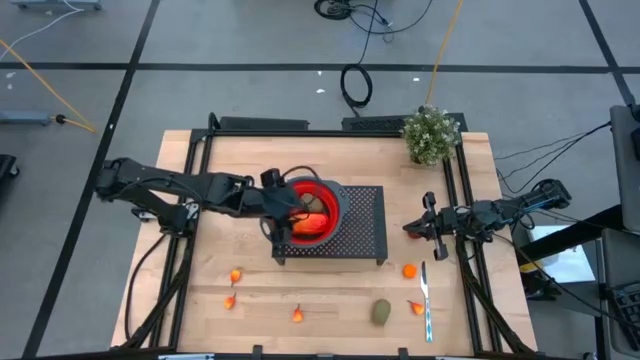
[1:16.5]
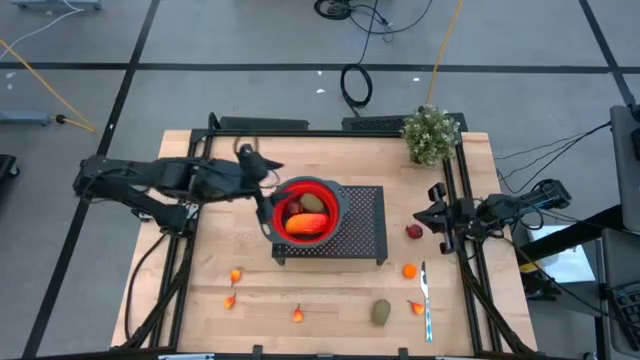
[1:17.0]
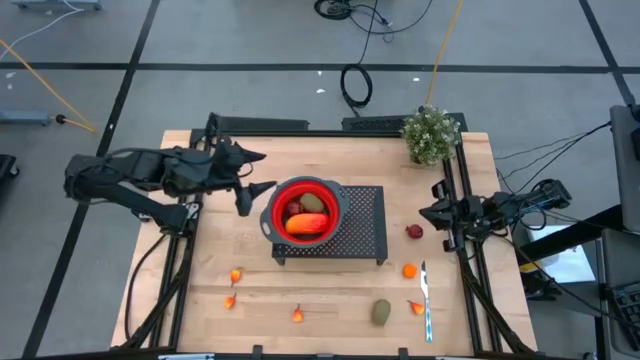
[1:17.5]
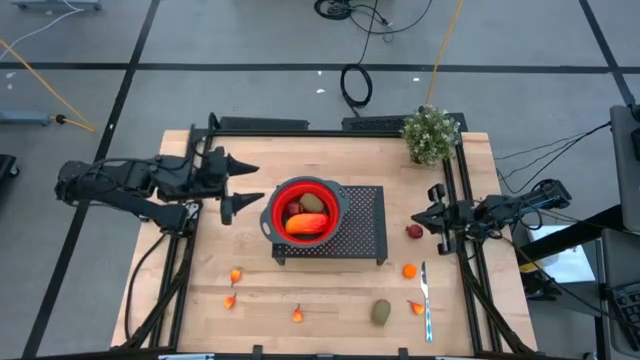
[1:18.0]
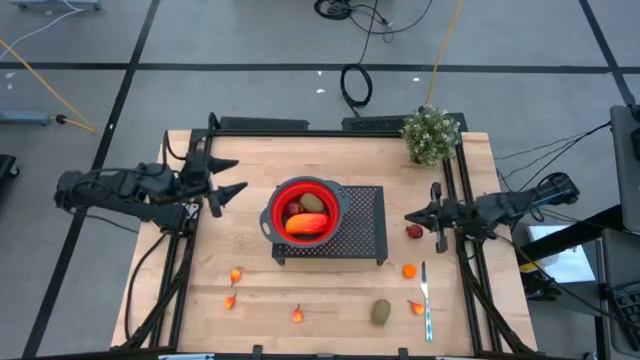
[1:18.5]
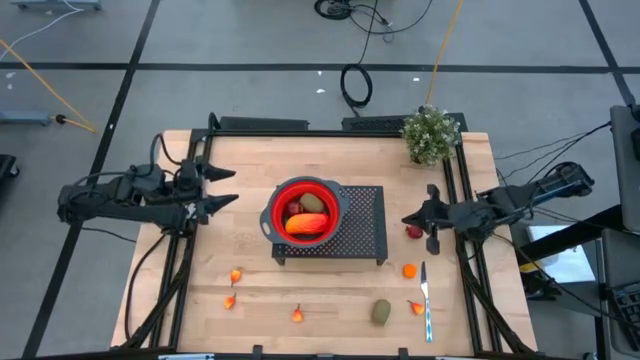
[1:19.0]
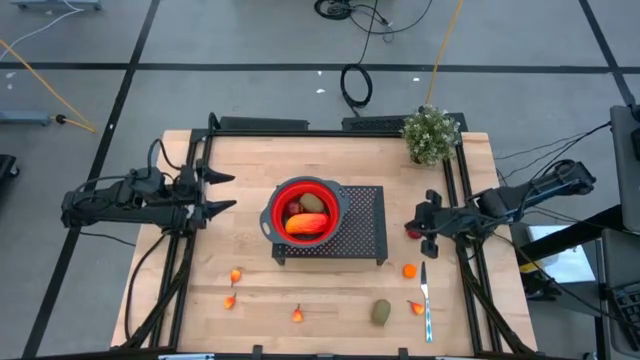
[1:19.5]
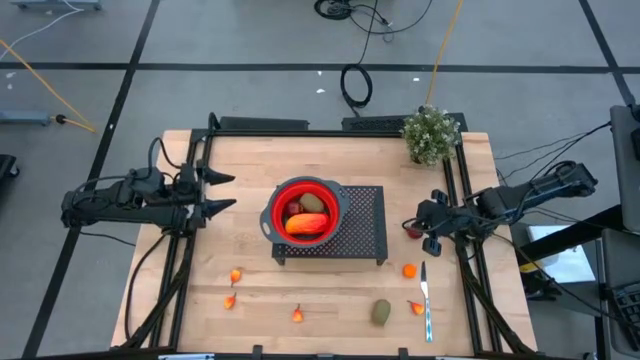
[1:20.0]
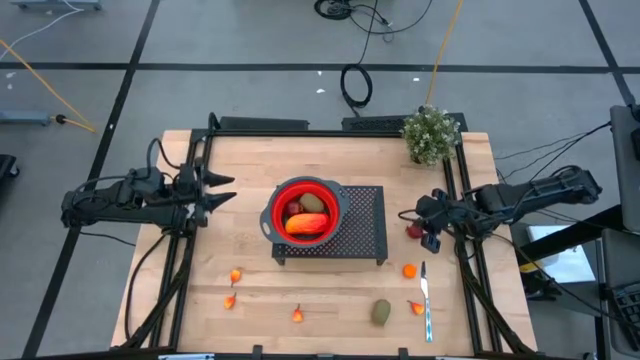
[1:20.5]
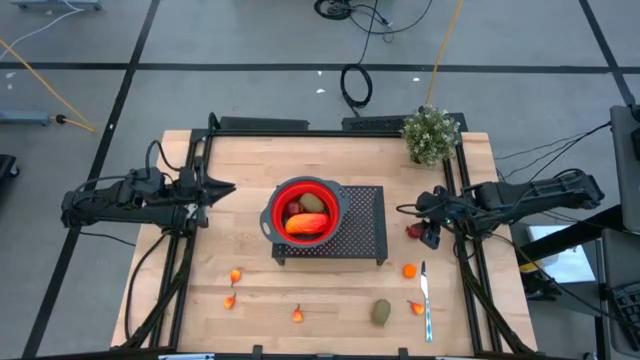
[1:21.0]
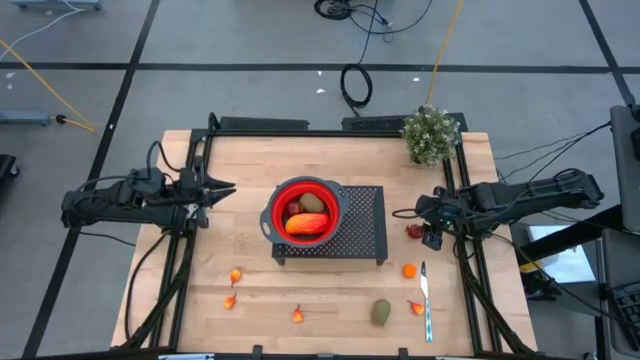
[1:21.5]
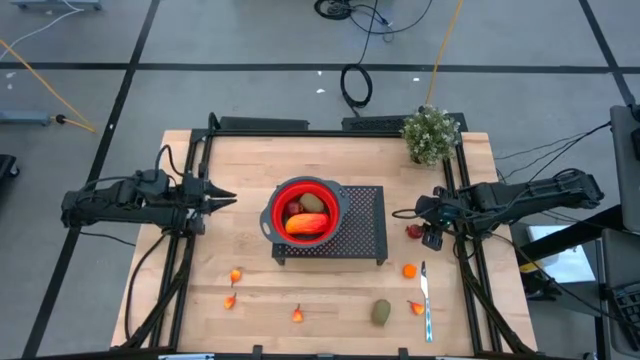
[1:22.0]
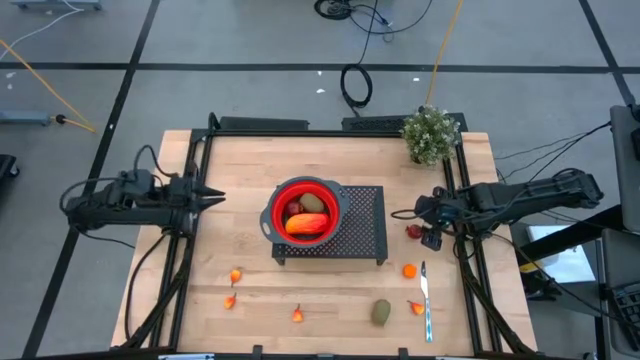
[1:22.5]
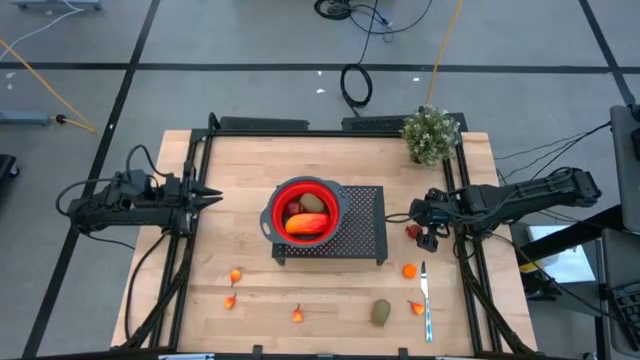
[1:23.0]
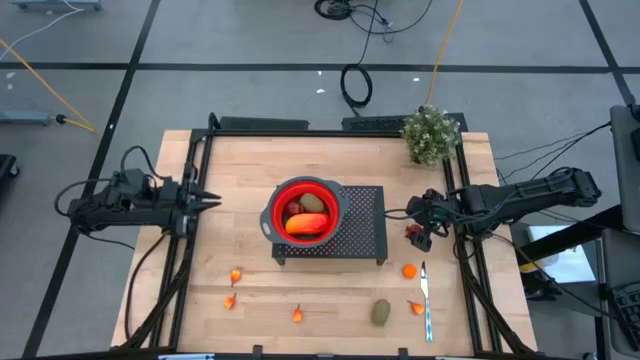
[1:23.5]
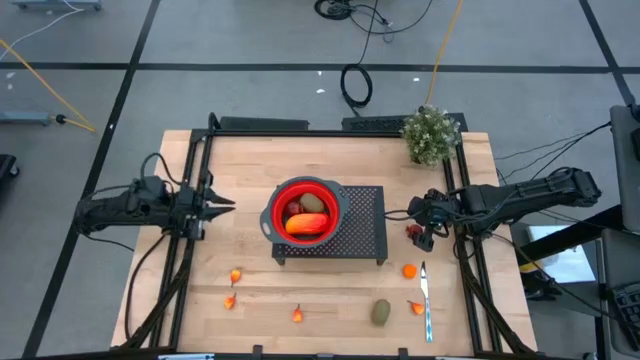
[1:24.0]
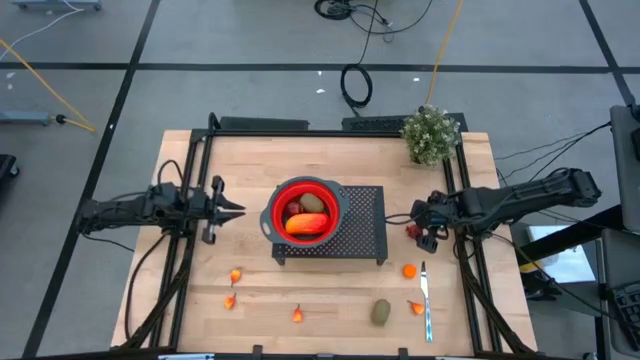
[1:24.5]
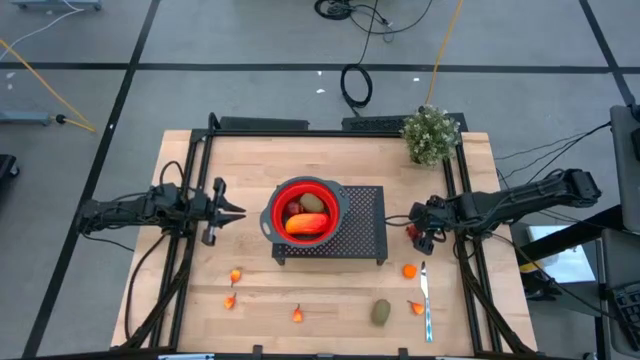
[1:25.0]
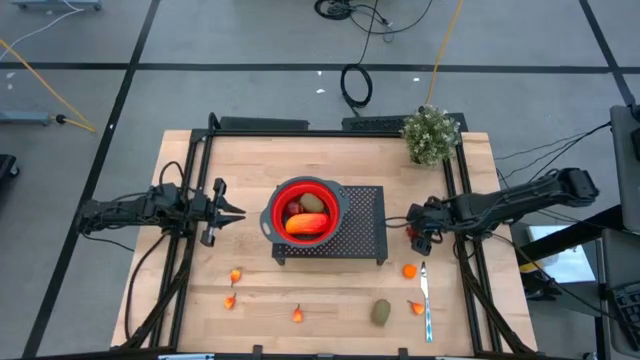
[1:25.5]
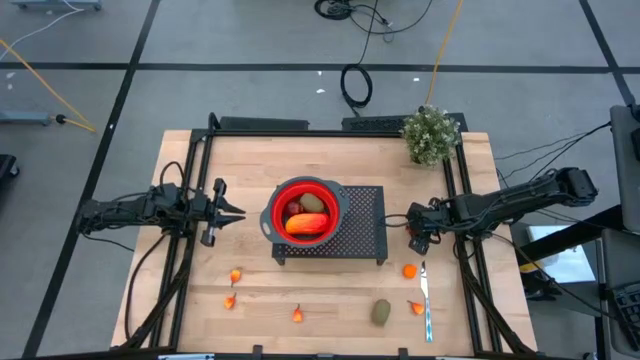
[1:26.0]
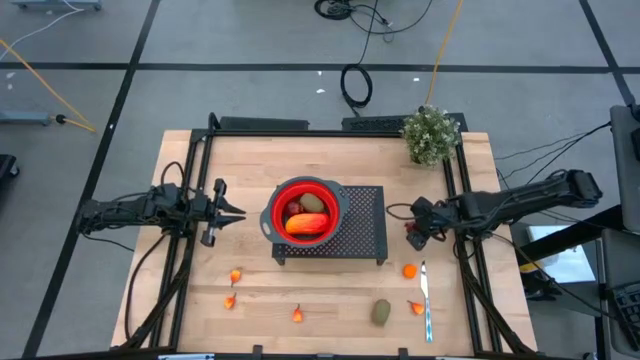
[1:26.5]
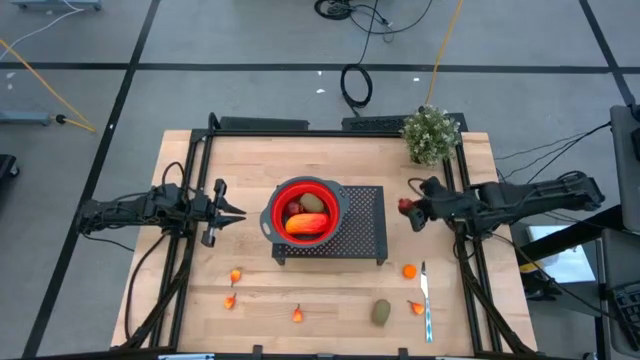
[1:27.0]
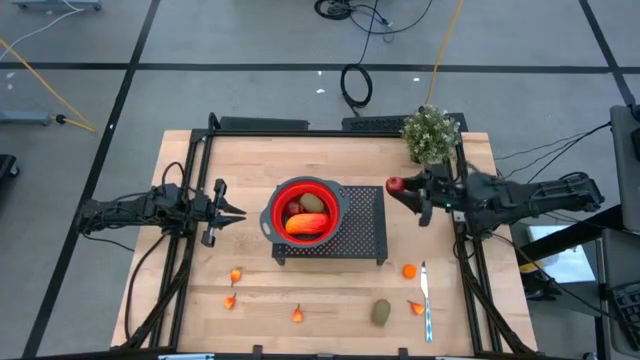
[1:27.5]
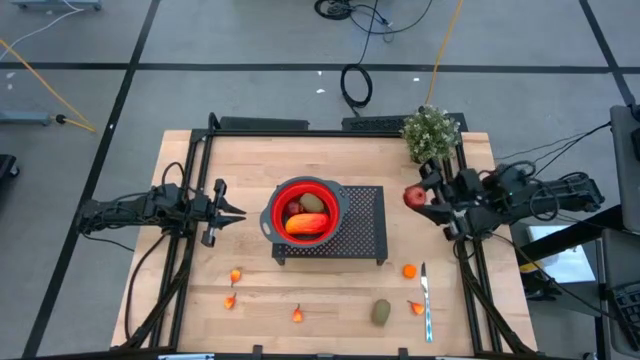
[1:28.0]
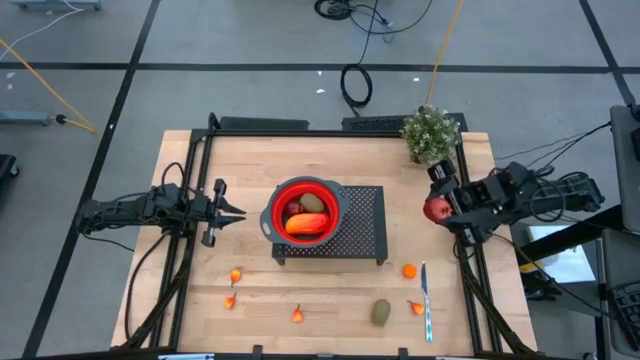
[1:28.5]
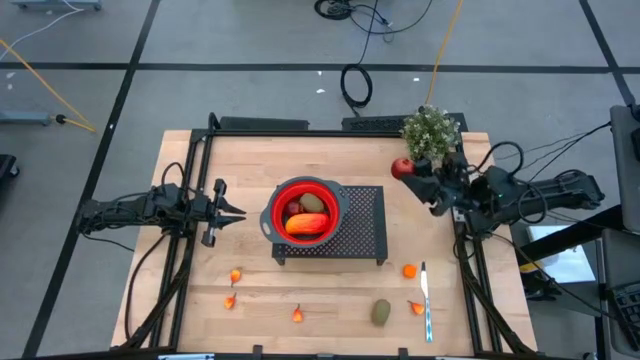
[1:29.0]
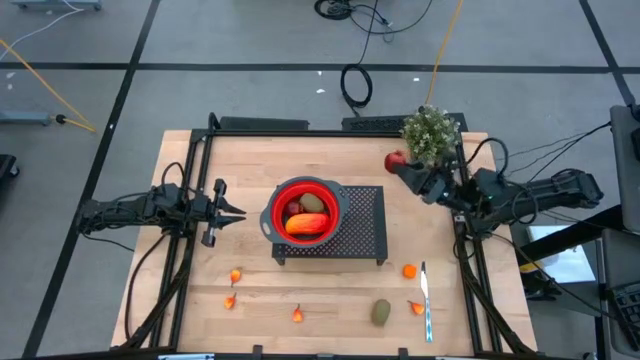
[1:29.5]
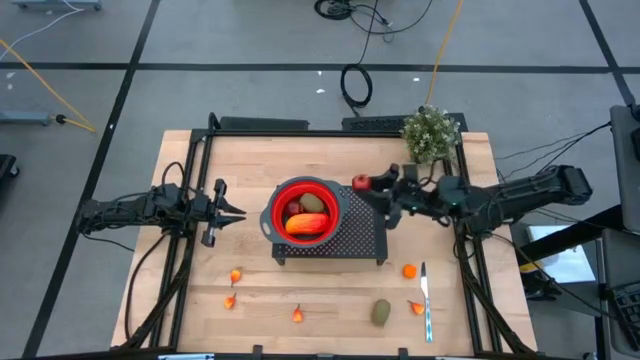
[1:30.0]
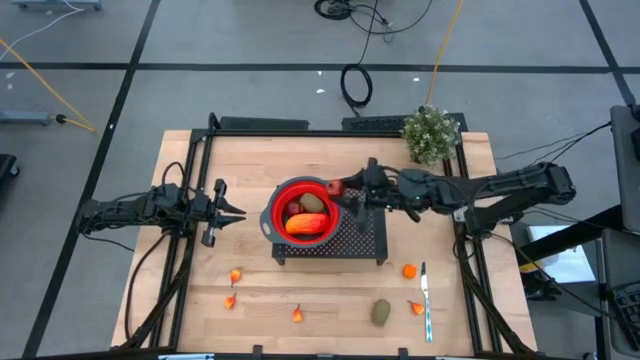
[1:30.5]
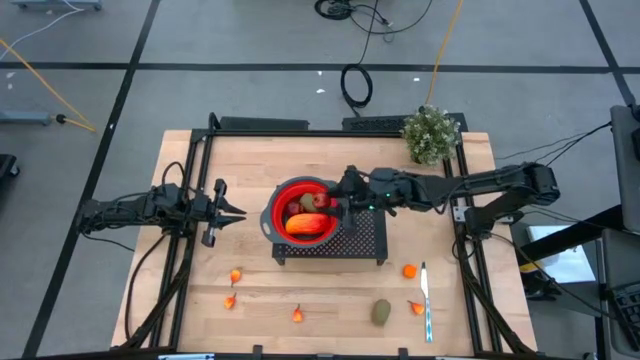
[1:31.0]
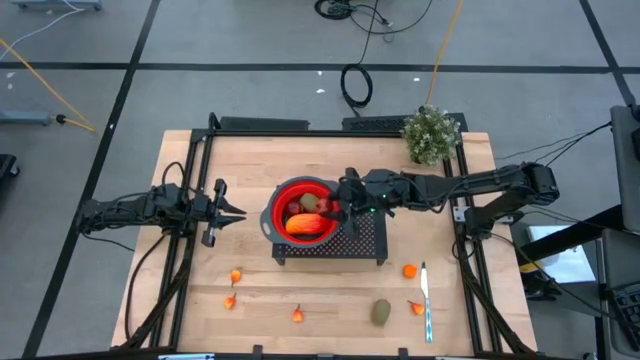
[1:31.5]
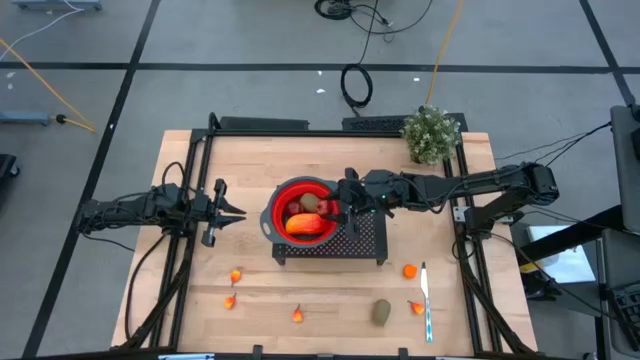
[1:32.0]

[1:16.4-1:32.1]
Task: Pick & Place Fruit
Put the red pomegranate into the red strainer bowl on the shelf

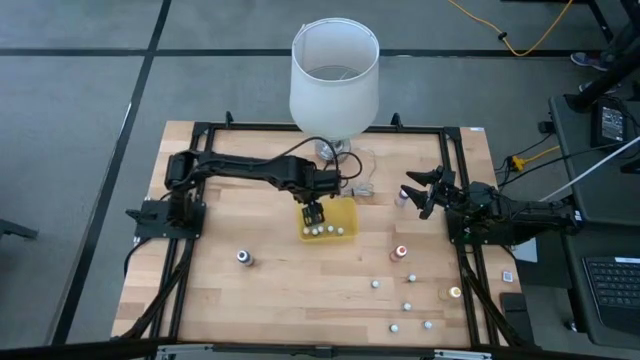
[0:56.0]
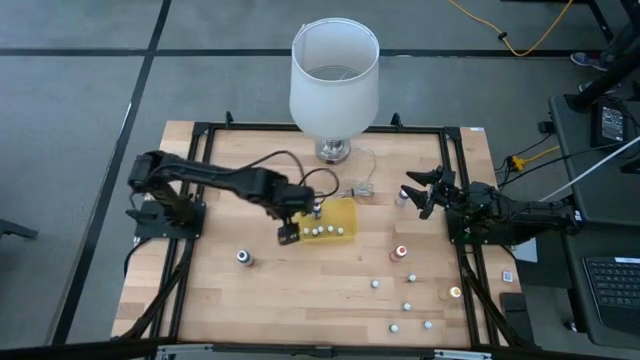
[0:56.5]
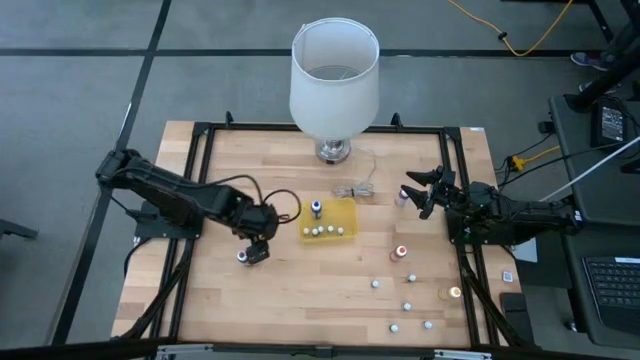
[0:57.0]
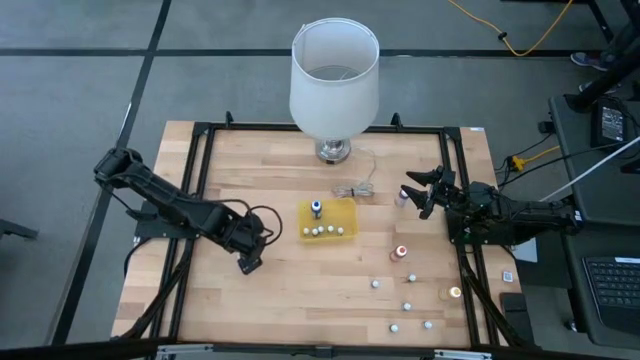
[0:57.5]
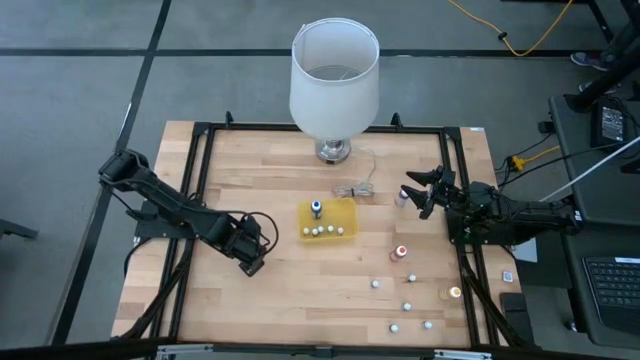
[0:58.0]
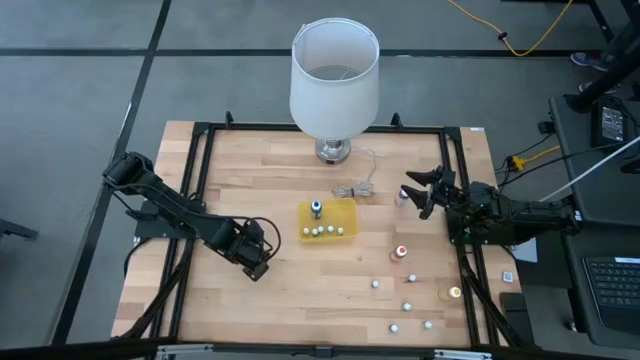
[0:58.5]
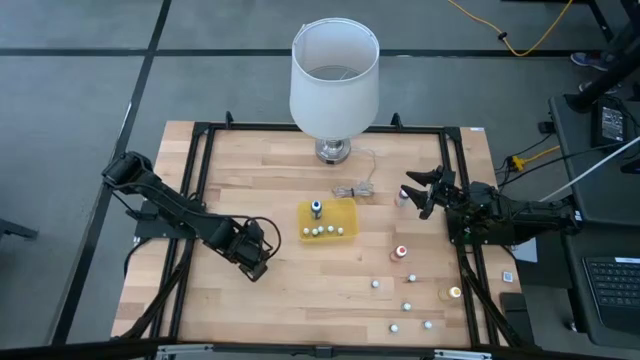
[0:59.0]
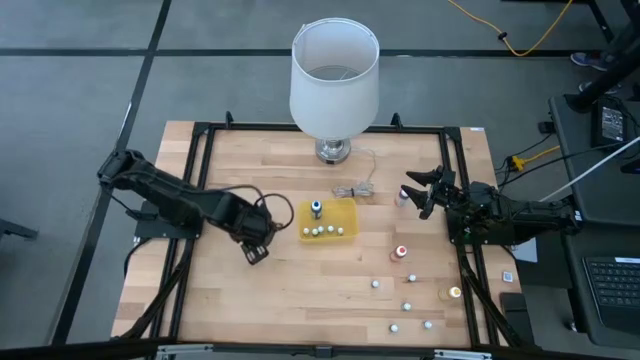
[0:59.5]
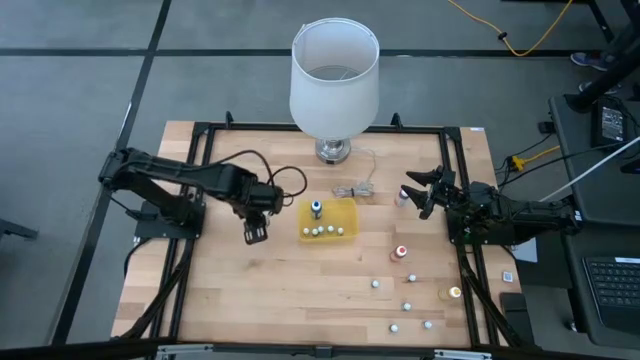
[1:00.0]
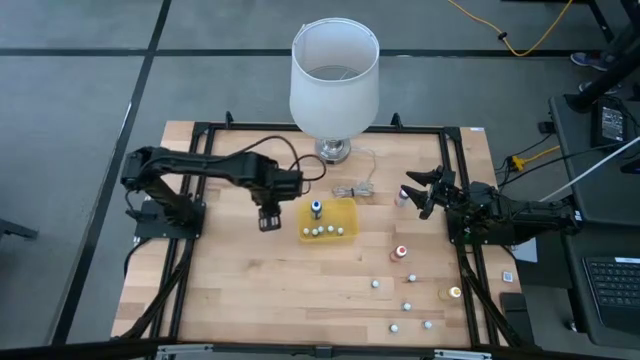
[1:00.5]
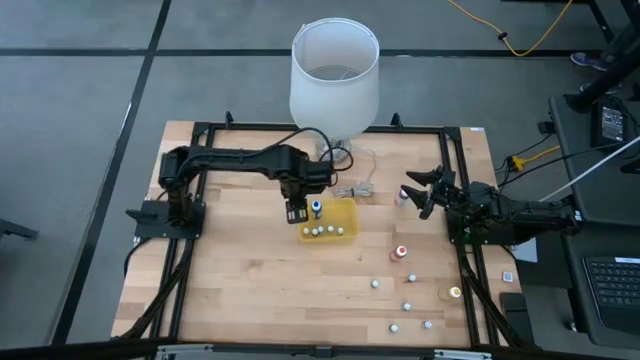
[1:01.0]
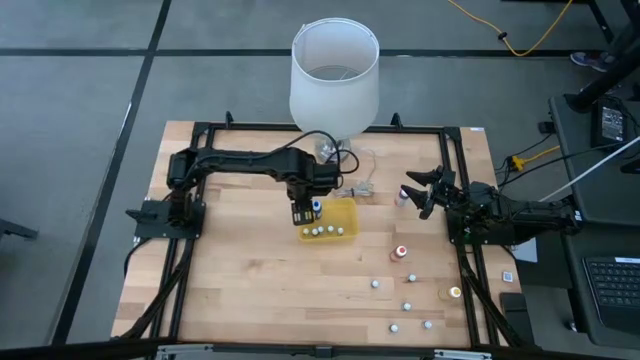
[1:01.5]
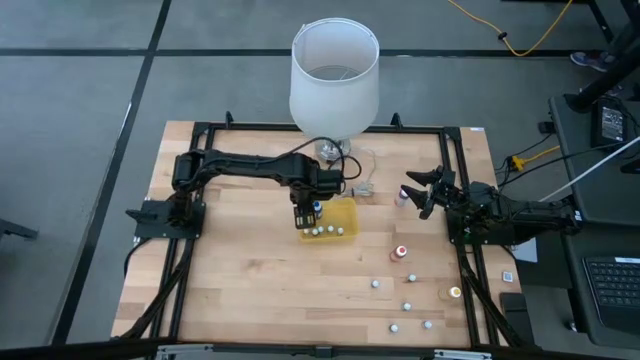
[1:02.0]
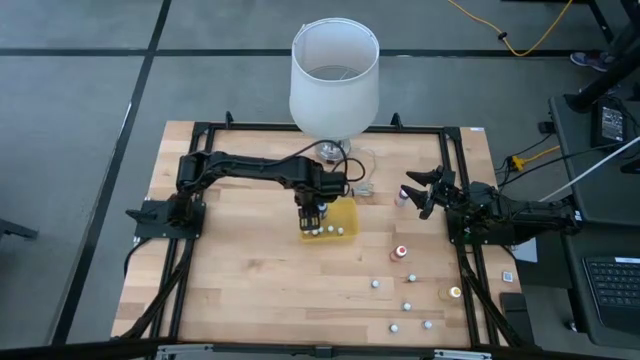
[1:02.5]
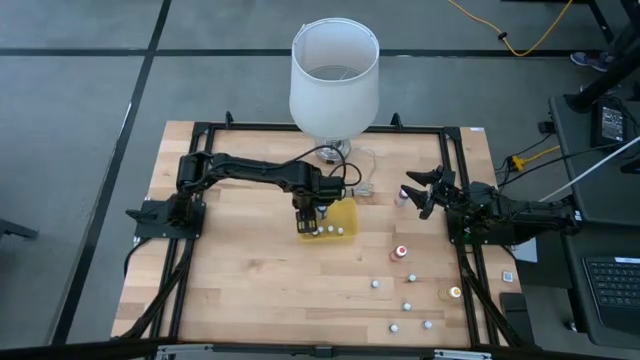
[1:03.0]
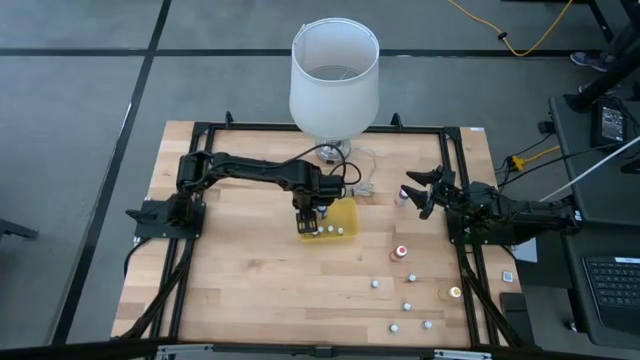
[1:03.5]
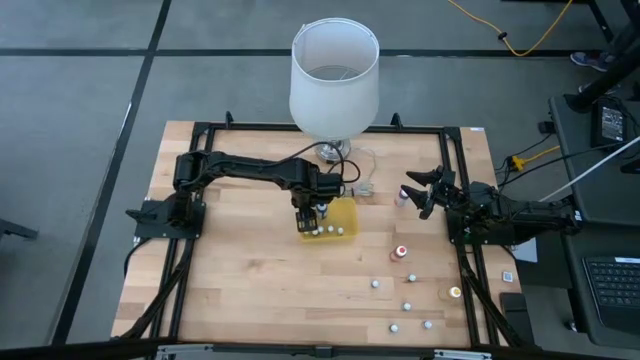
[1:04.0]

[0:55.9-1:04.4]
Task: Pick & Place food coloring
Put the large purple food coloring bottle into the yellow bin
